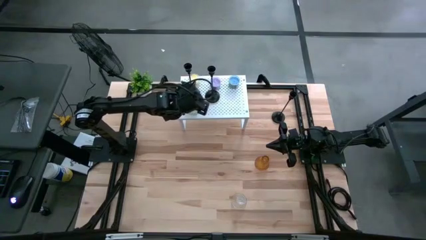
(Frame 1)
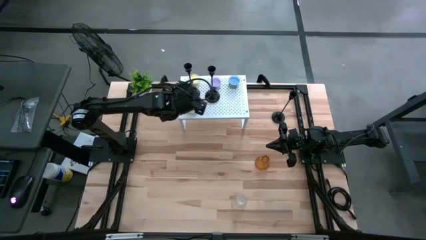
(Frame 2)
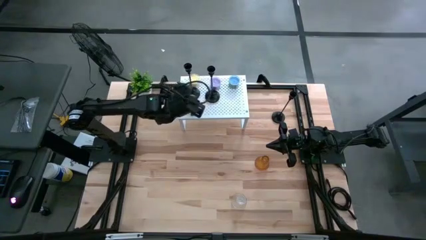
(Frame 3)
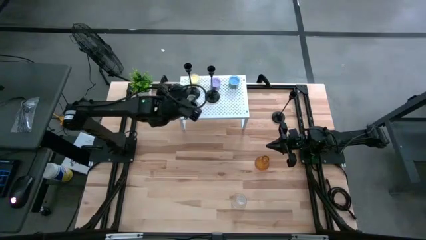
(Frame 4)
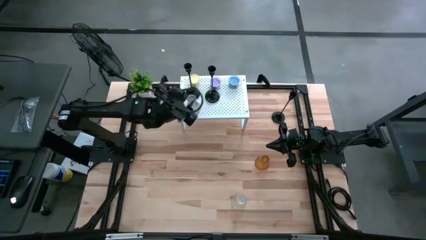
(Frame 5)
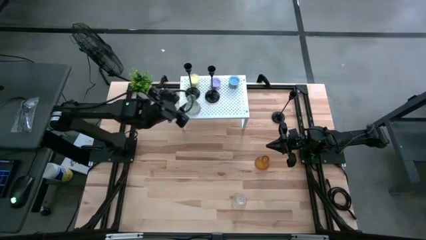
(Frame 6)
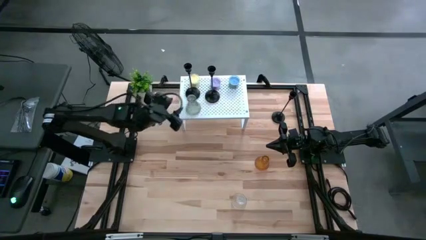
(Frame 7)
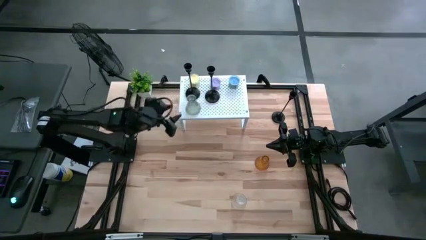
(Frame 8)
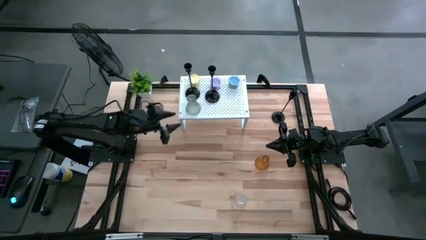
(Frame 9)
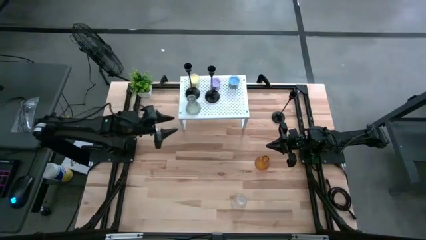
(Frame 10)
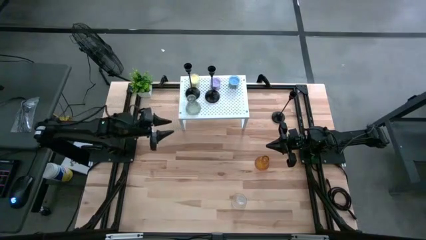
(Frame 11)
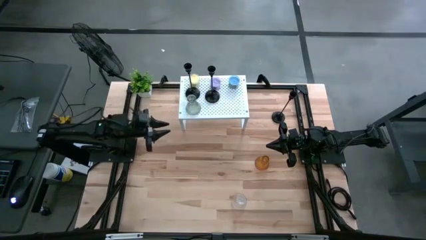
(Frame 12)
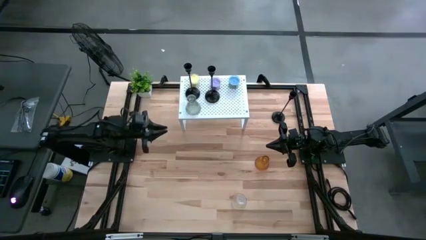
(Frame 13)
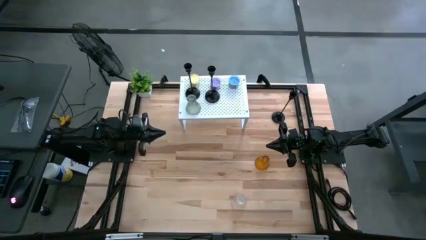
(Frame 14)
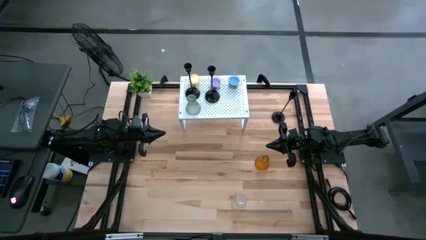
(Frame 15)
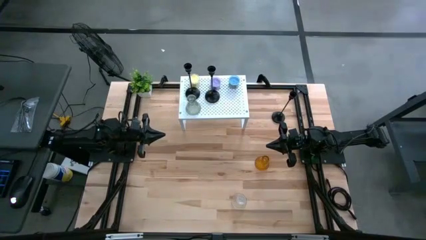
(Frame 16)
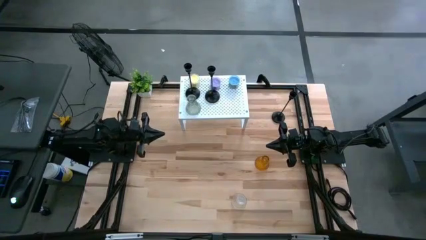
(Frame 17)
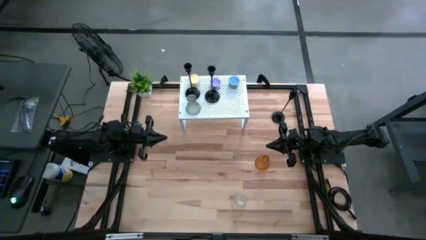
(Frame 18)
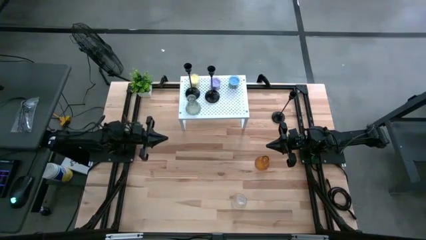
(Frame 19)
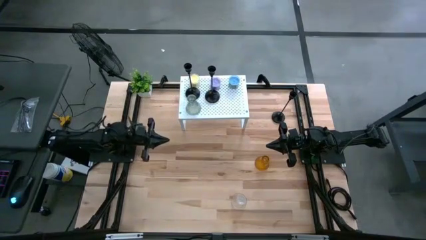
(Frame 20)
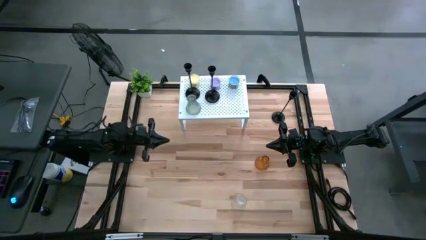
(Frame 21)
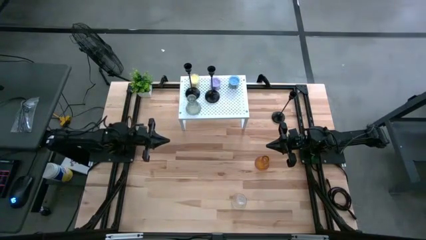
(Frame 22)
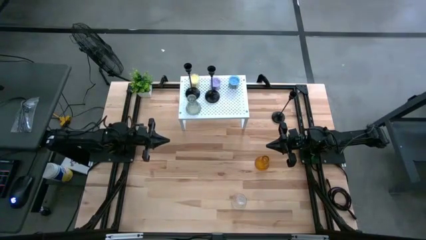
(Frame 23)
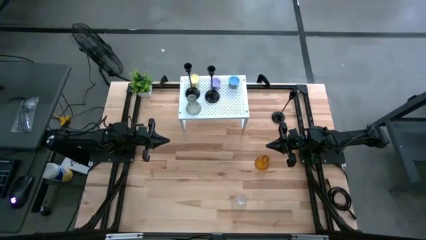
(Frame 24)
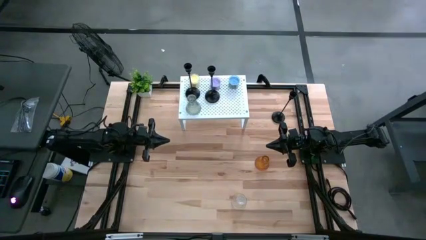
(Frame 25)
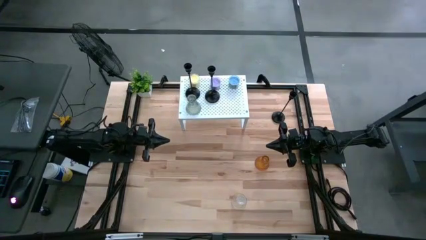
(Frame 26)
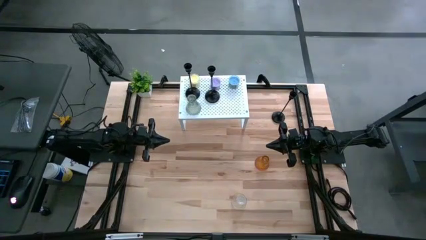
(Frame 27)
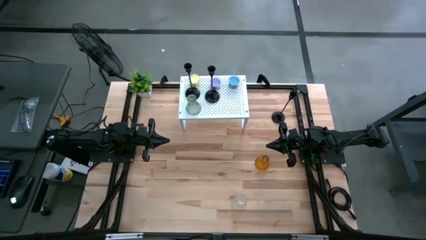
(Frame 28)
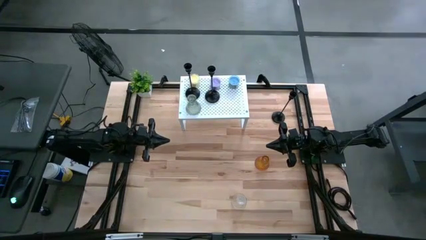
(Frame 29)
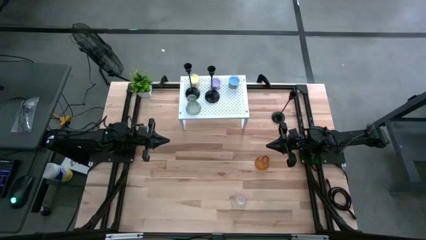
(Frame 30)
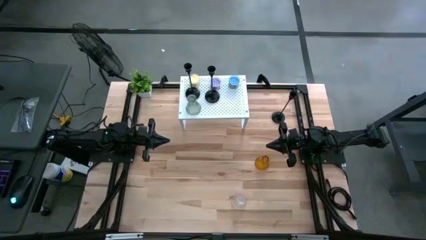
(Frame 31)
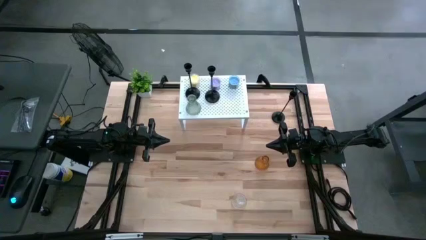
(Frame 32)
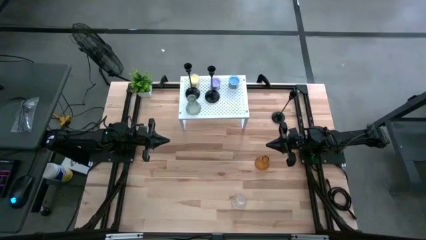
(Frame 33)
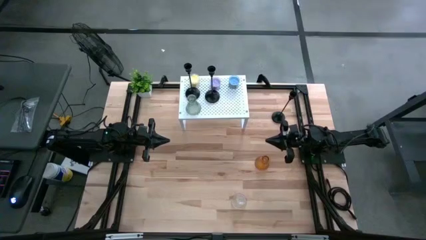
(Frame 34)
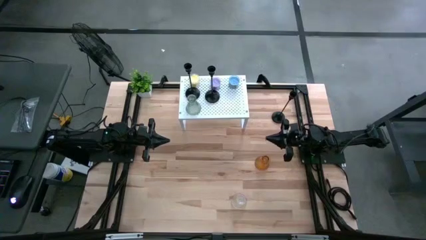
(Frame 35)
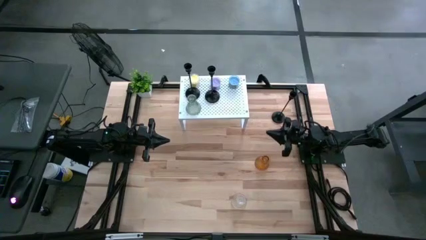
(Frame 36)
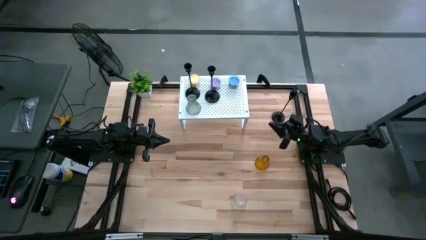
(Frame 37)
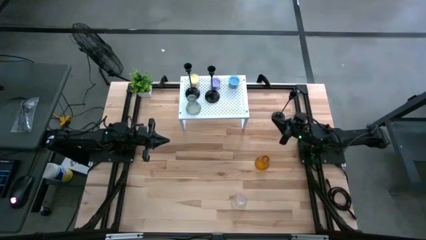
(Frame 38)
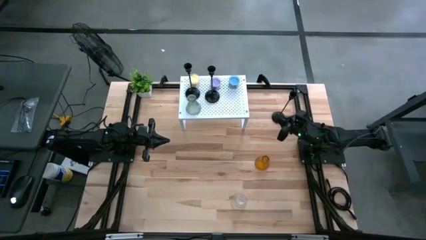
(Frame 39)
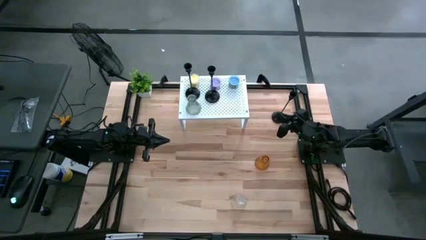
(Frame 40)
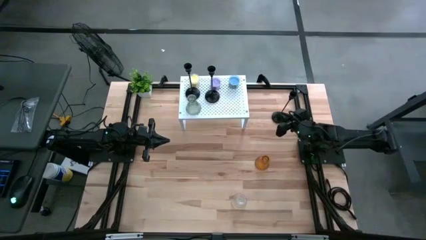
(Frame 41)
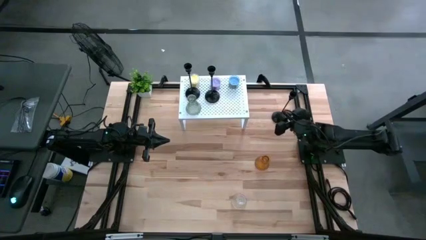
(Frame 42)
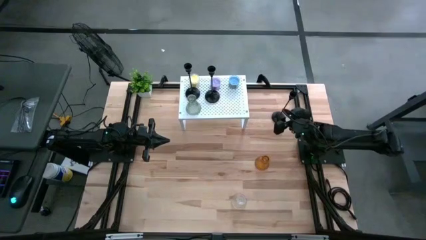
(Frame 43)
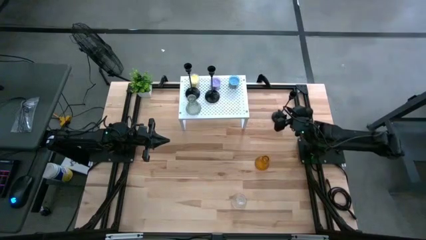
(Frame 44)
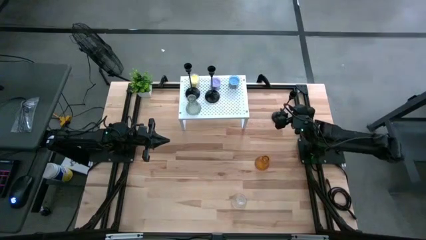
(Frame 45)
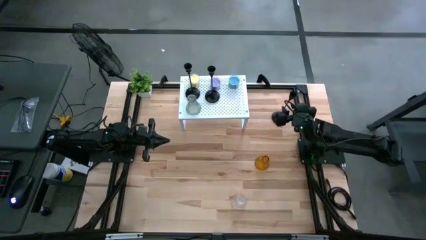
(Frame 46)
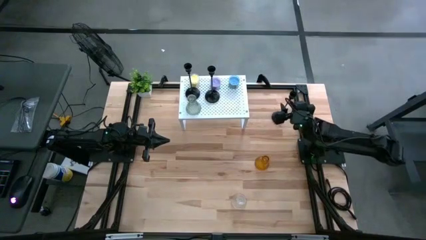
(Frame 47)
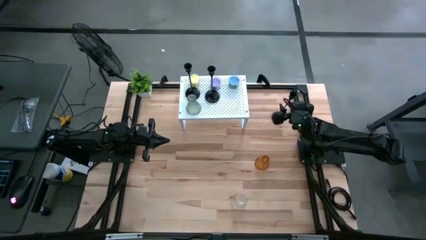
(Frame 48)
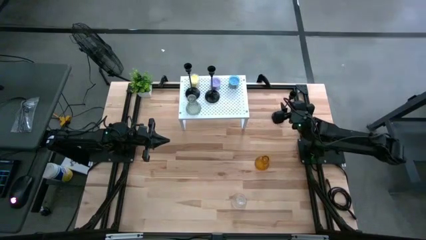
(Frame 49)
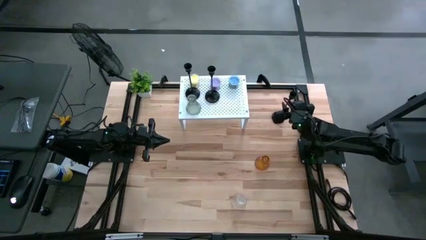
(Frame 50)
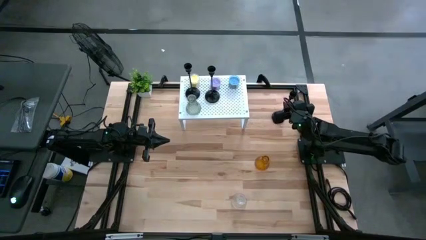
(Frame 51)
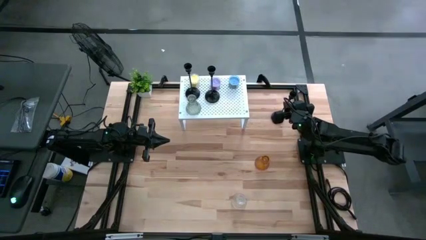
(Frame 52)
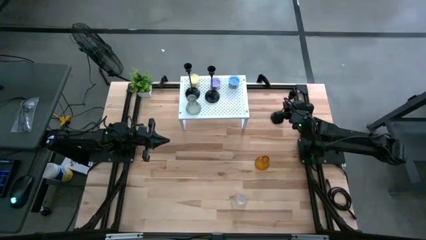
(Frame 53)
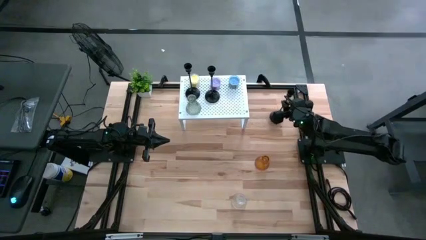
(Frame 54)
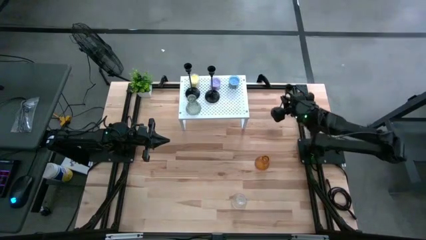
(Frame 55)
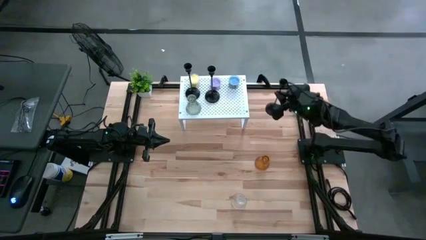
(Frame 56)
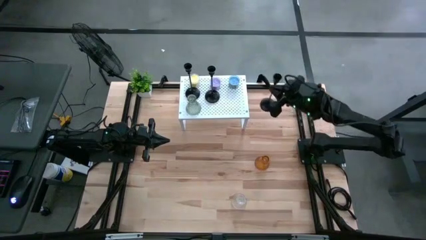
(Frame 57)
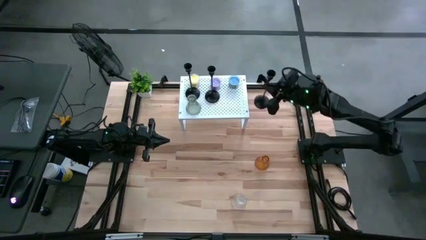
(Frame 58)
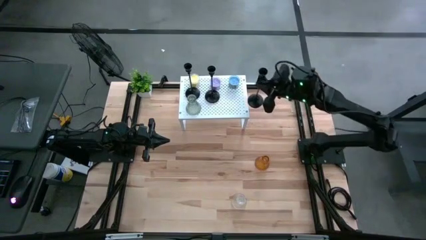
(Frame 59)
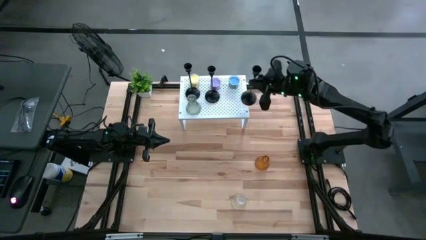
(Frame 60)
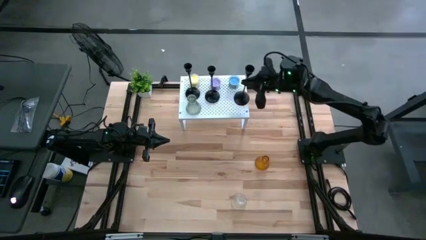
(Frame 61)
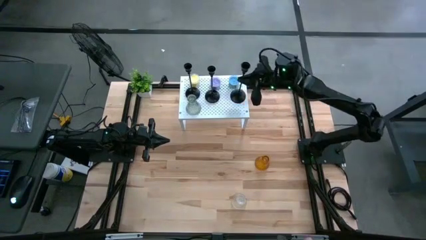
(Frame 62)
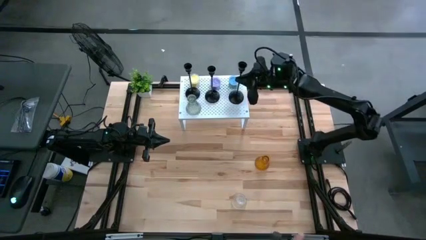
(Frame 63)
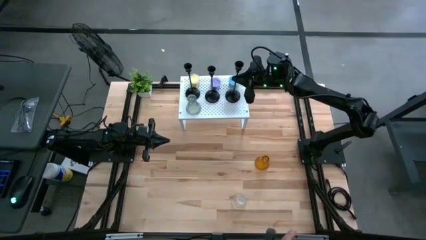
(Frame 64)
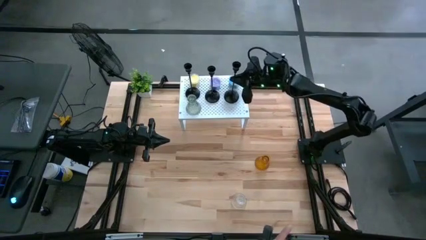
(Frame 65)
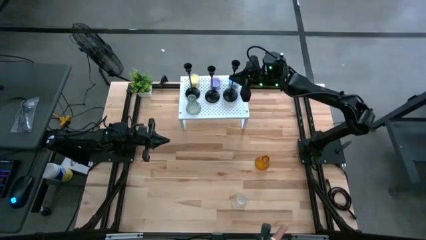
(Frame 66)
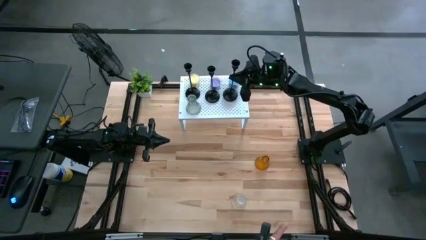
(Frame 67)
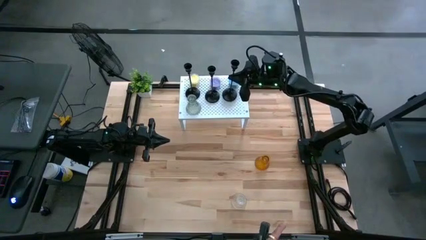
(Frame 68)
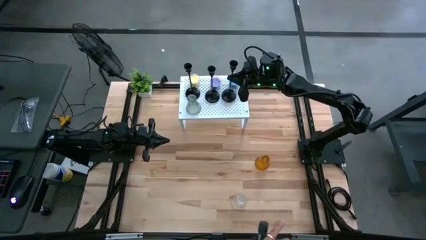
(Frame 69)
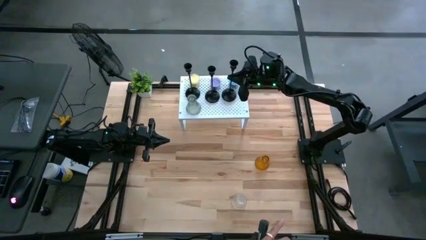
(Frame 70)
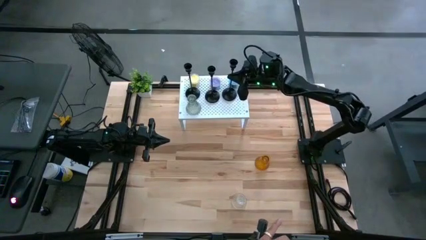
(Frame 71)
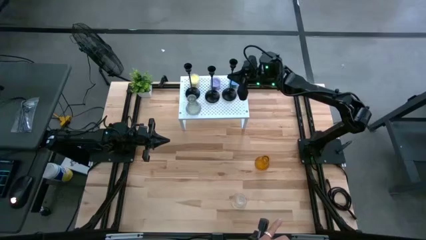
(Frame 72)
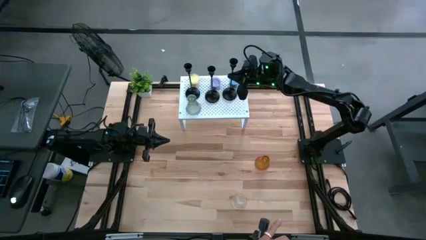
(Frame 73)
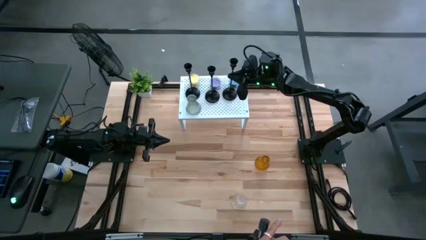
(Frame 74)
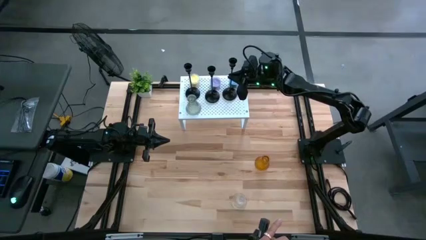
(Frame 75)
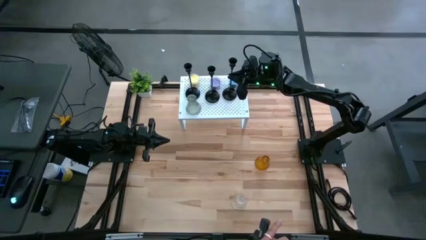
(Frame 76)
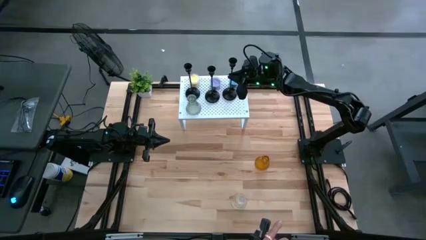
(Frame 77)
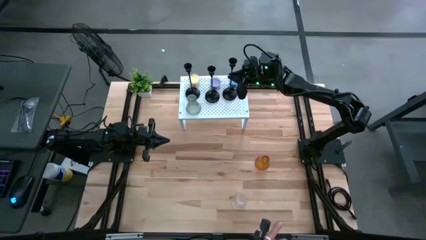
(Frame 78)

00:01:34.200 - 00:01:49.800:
Task: Pick & Place candle stick holders
Put the black candle holder on the shelf
